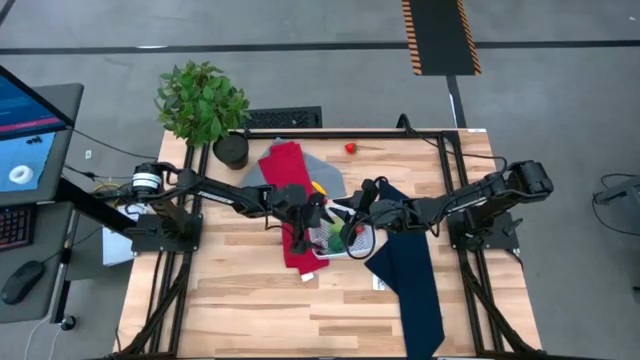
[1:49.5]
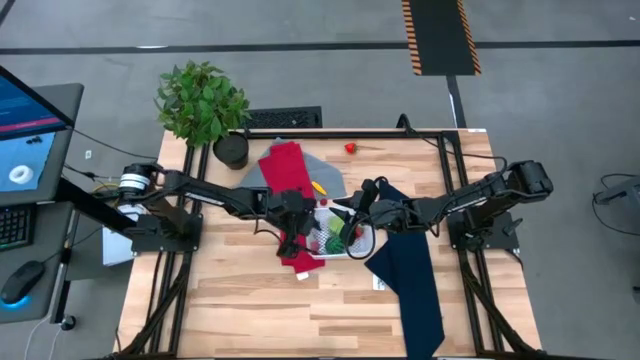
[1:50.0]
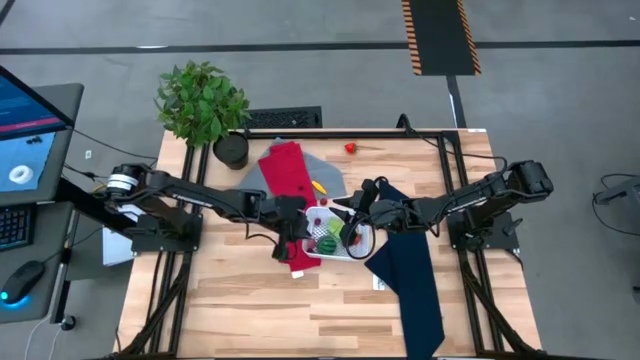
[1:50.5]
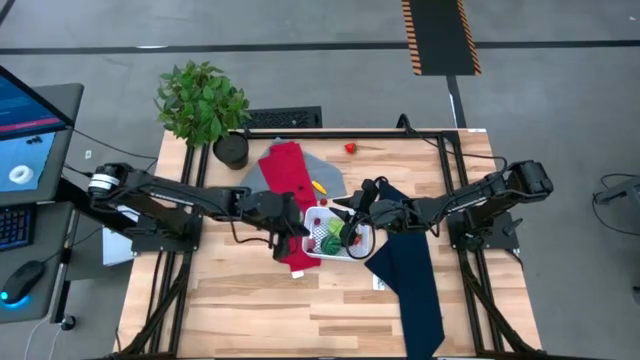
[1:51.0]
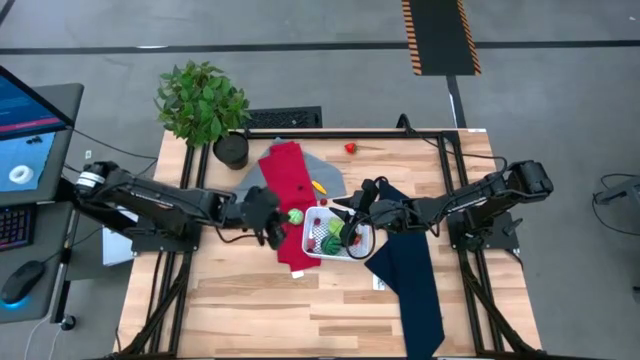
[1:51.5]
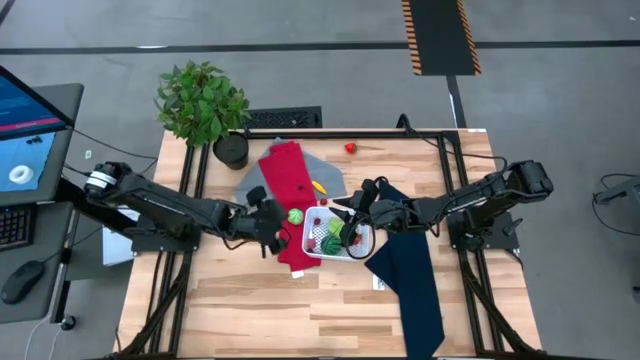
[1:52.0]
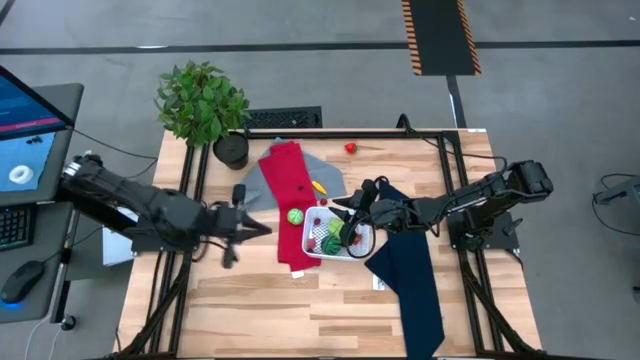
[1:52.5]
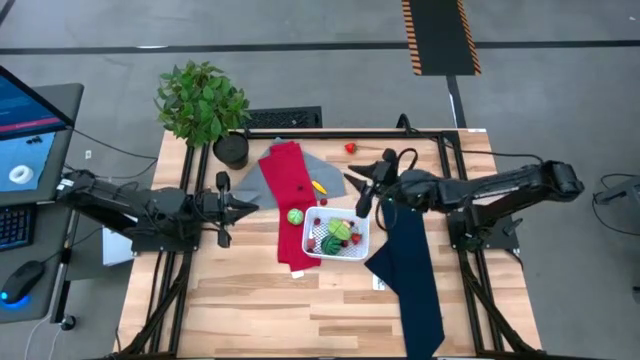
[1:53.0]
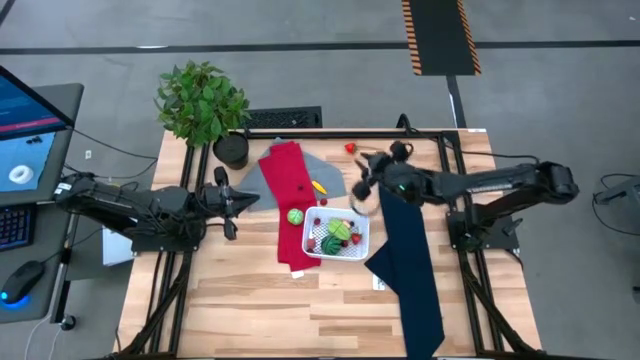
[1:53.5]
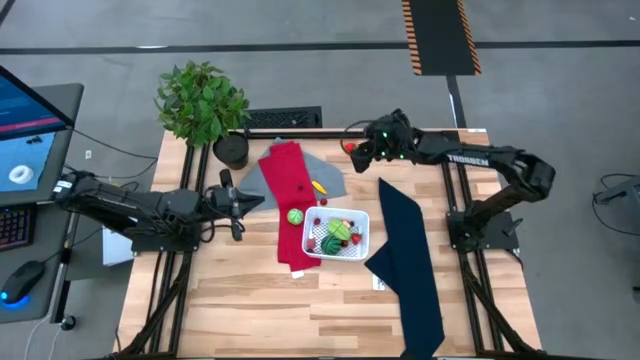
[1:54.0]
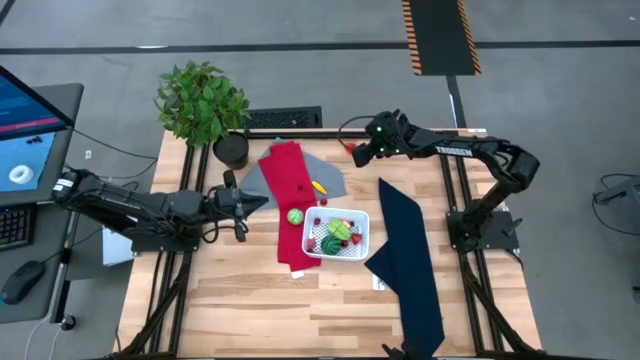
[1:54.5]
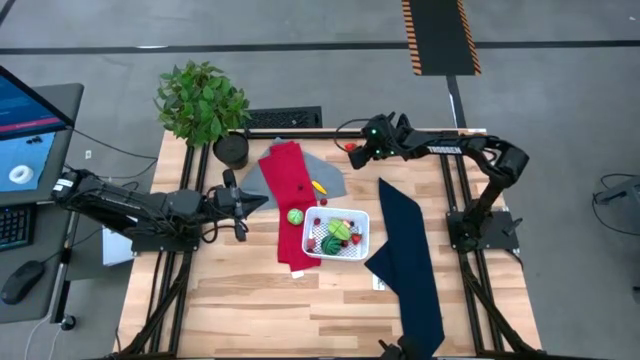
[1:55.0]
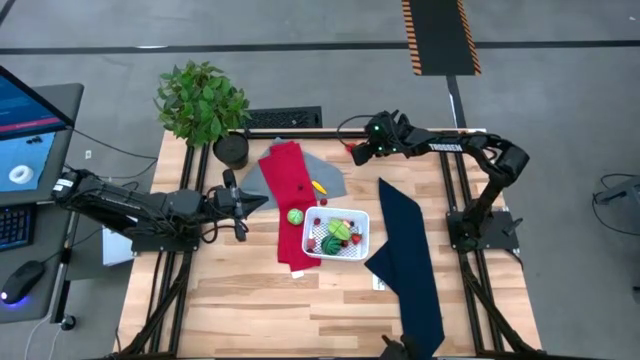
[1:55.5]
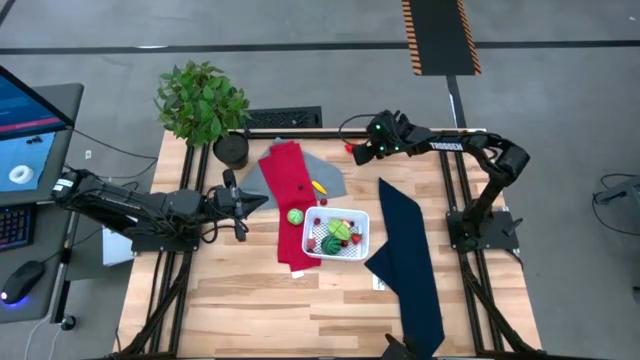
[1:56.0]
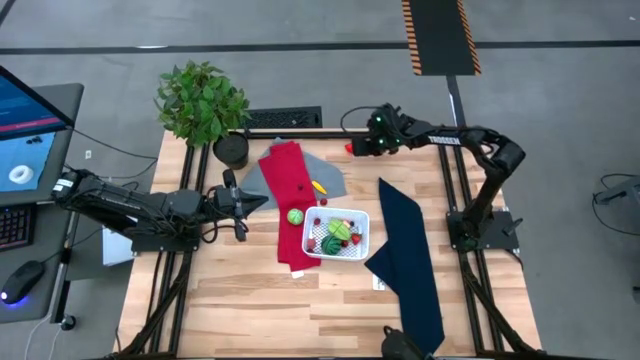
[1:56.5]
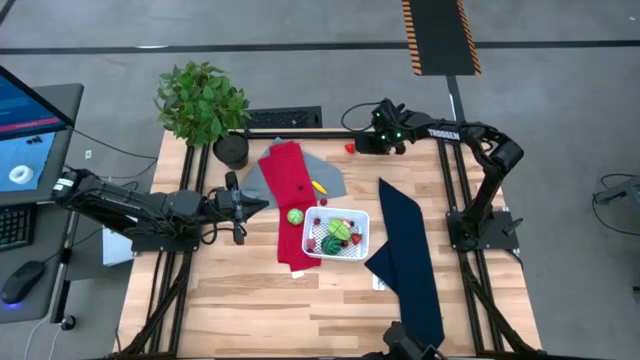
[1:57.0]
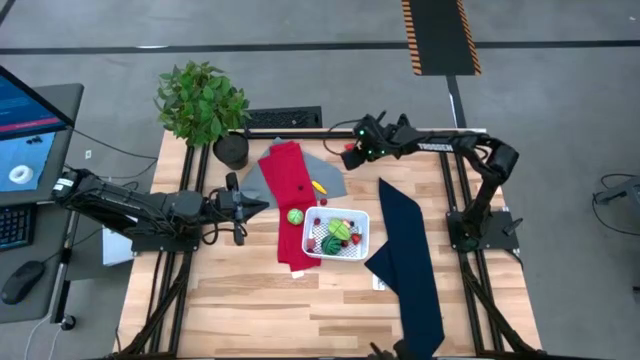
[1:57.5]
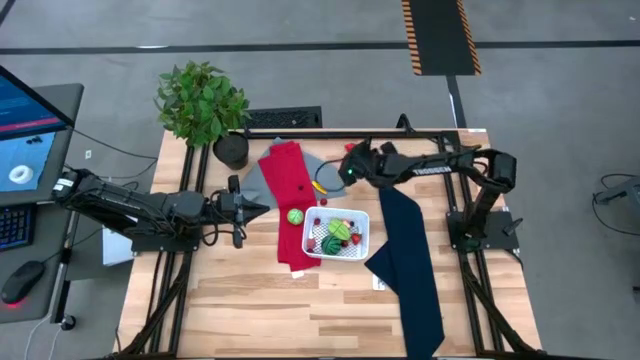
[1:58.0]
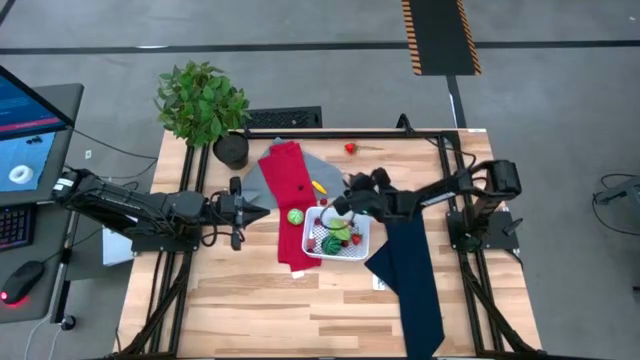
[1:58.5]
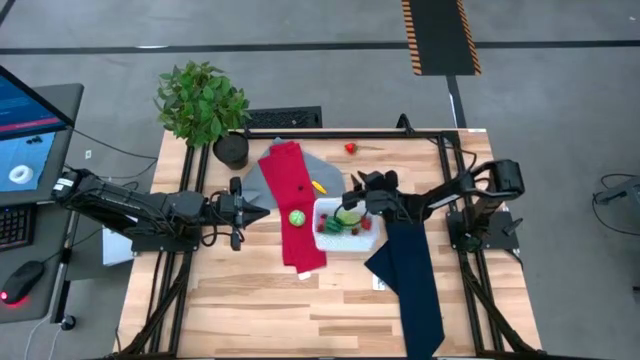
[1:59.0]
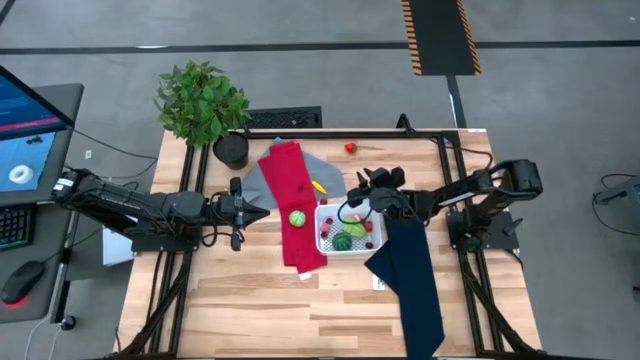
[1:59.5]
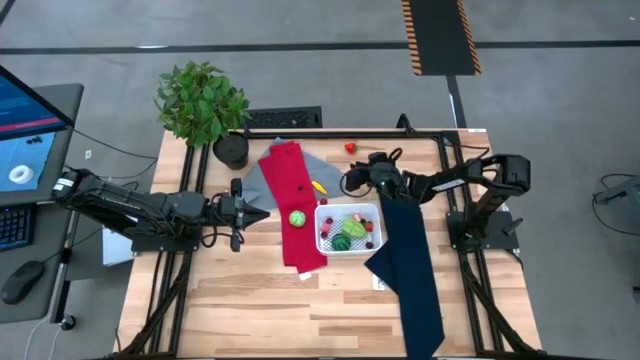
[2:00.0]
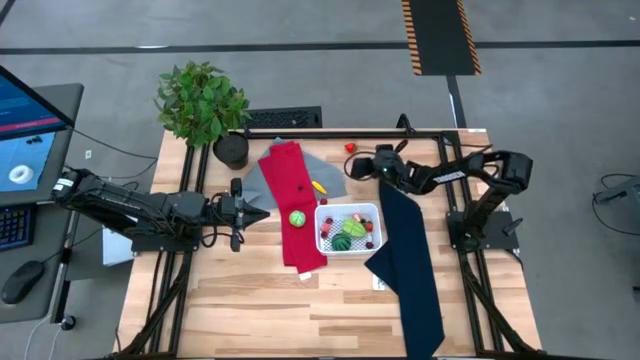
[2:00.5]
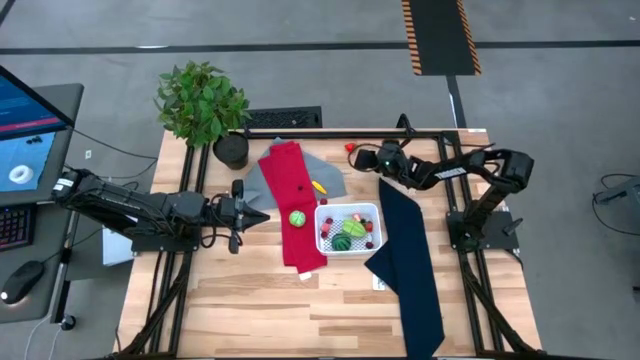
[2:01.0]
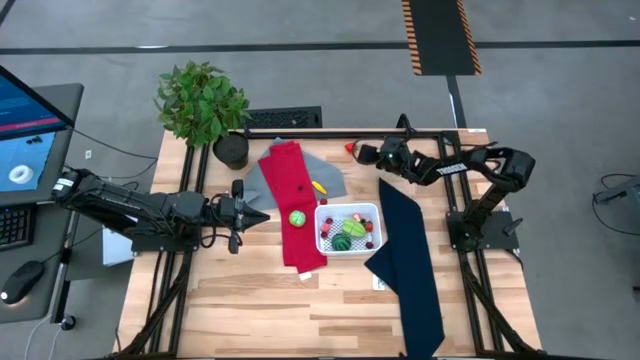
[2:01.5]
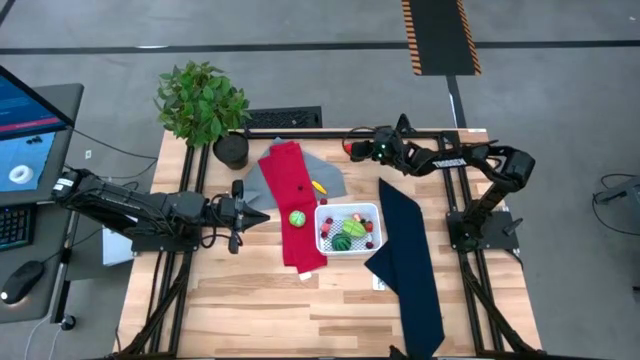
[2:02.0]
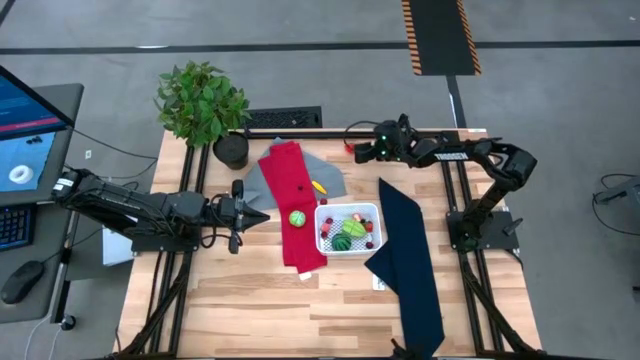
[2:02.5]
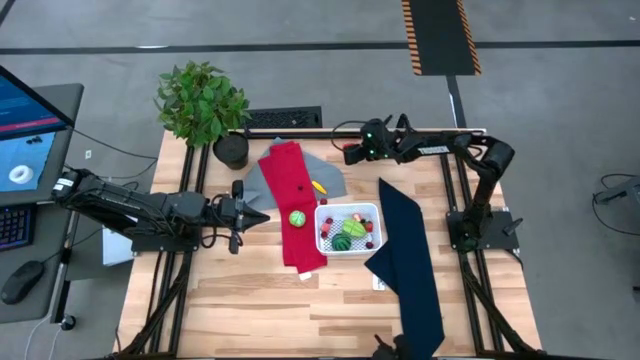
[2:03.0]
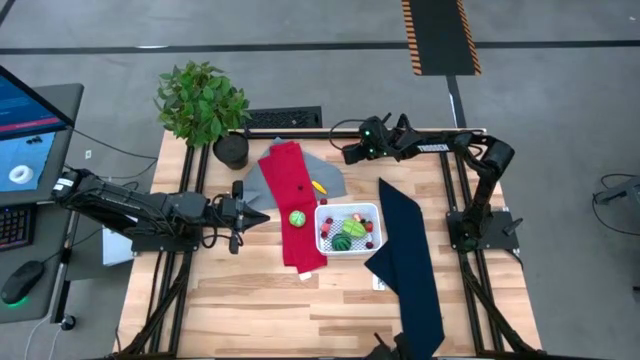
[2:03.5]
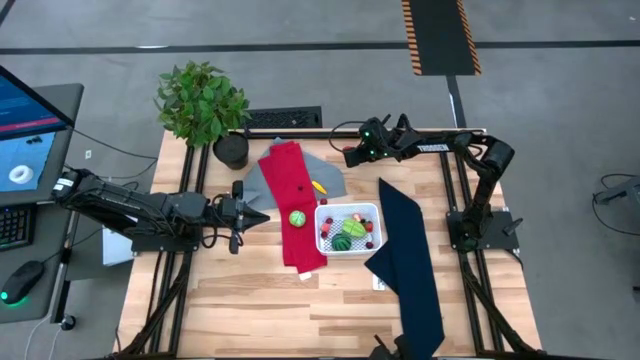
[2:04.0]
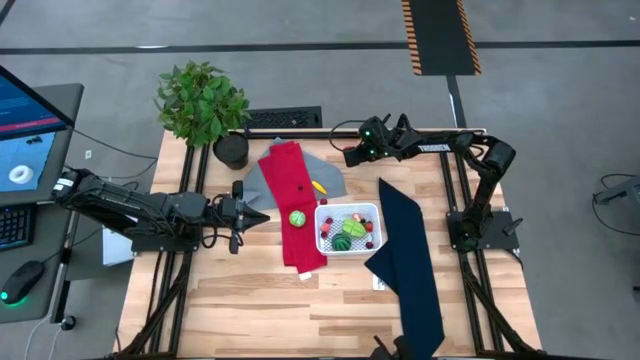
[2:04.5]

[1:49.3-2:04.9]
Task: Pick and placing Produce into tupperware
Put the strawberry into the white bin

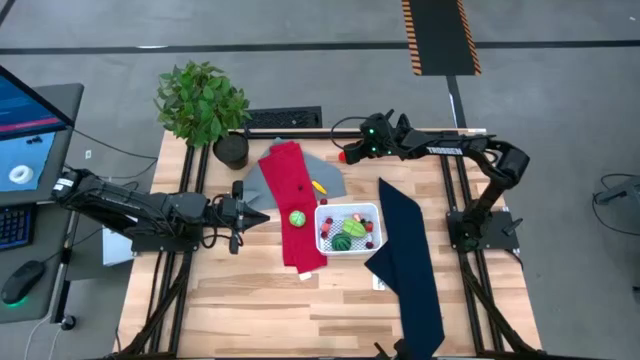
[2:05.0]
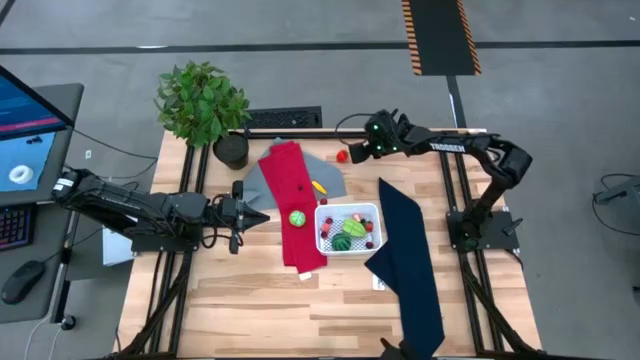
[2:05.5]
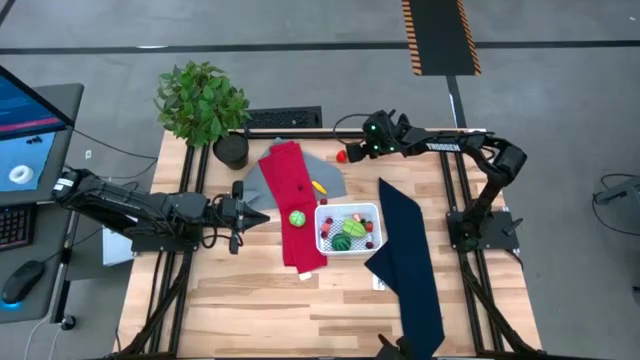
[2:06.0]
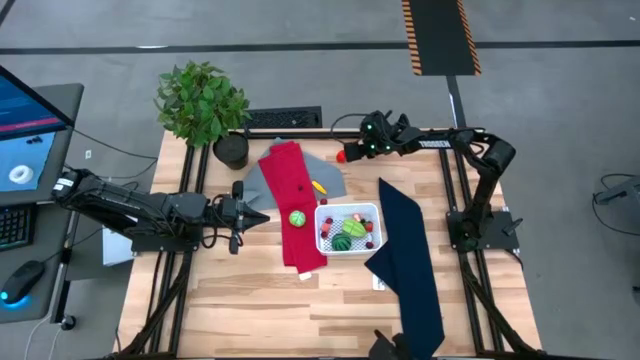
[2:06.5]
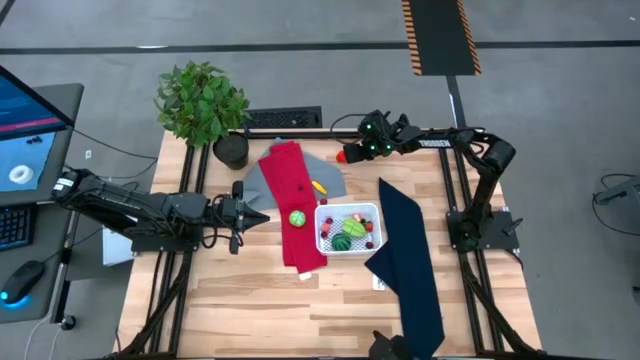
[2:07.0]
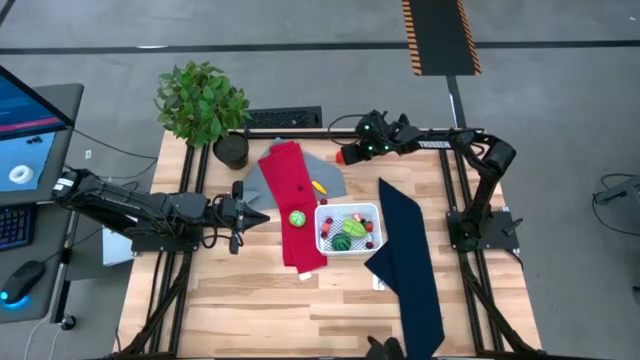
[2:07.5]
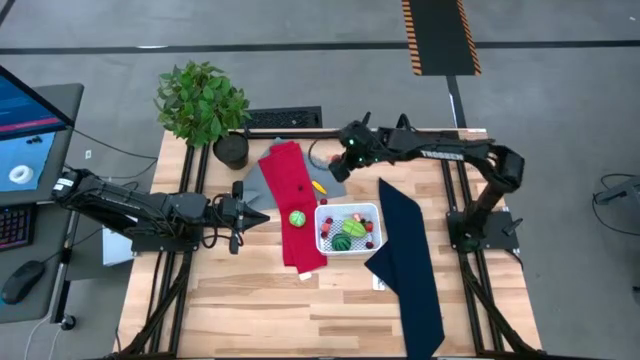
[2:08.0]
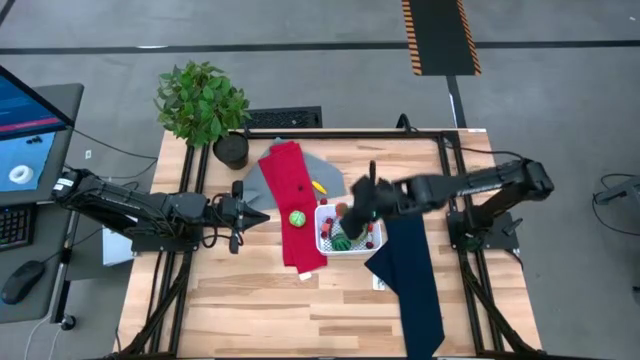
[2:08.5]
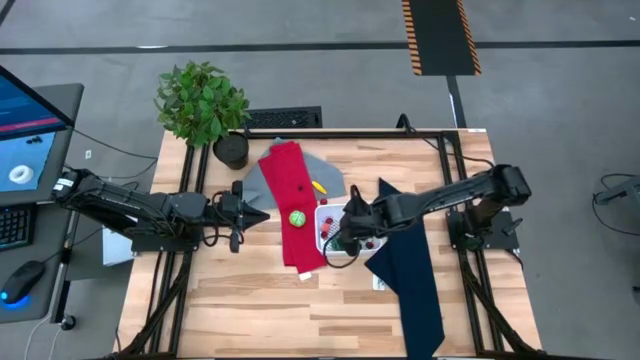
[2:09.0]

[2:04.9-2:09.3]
Put the strawberry into the white bin

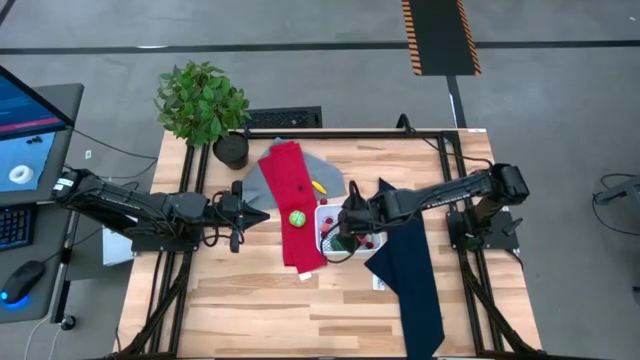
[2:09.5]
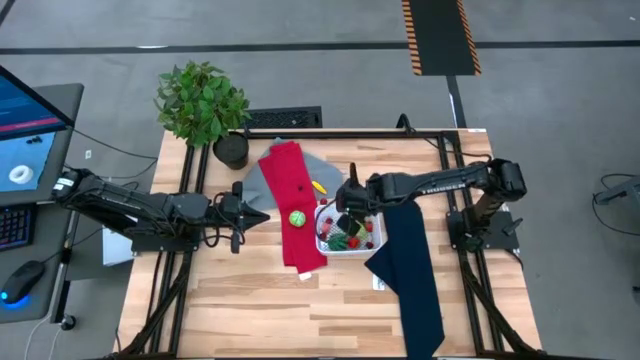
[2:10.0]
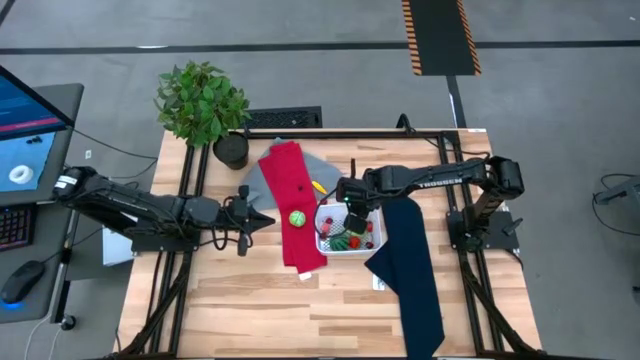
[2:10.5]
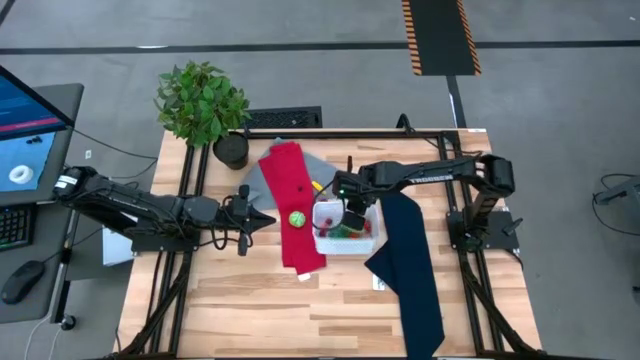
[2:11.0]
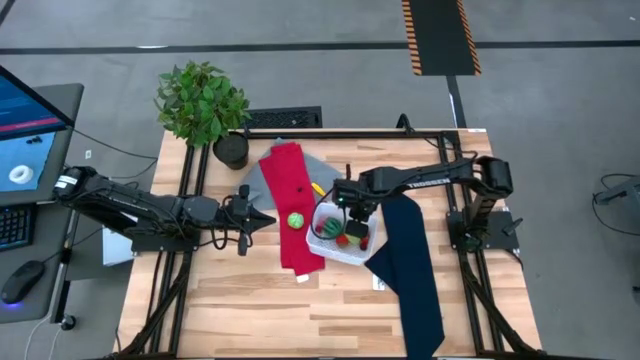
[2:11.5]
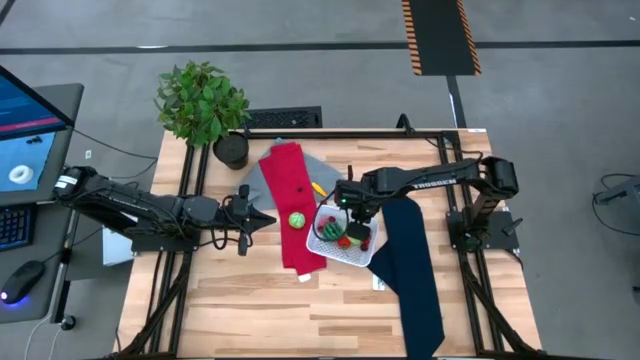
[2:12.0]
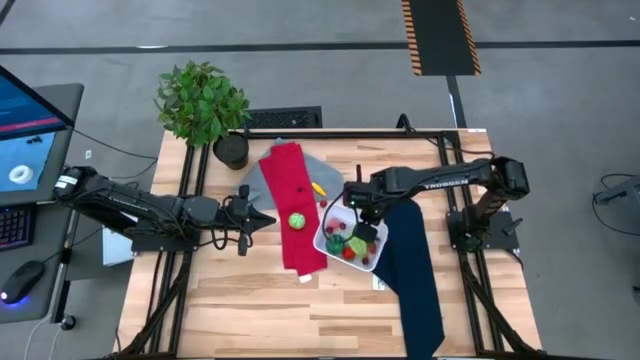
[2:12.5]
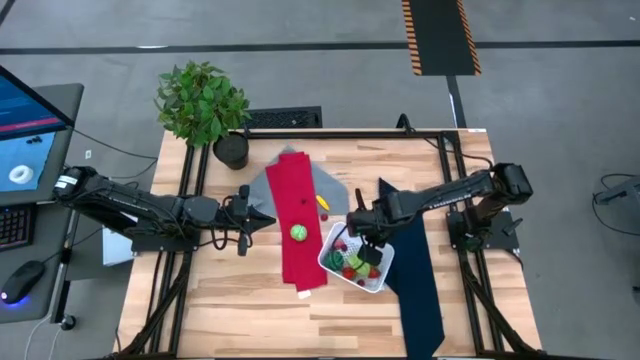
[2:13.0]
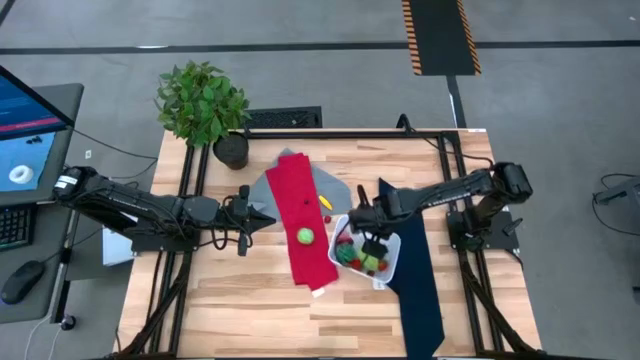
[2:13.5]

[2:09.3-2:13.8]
Adjust the white bin
